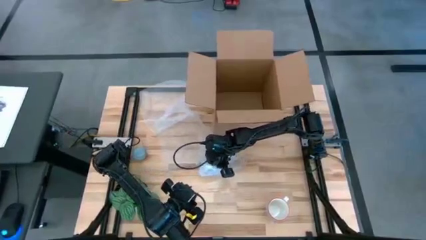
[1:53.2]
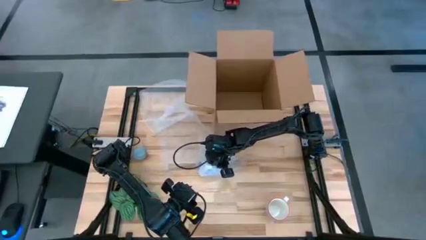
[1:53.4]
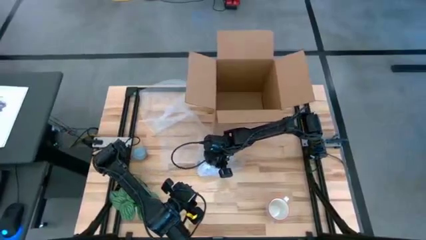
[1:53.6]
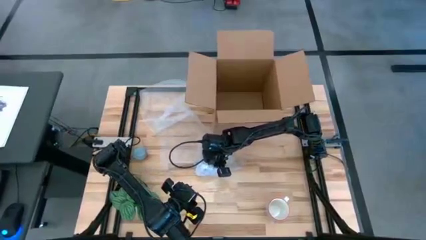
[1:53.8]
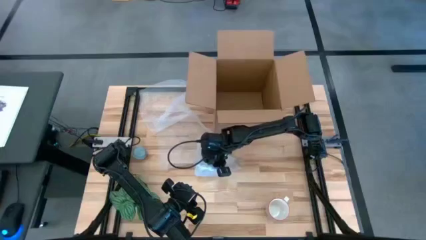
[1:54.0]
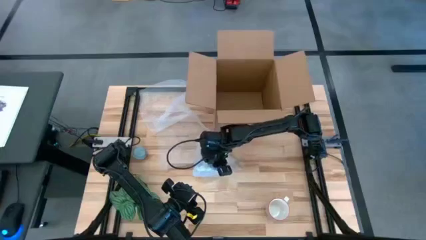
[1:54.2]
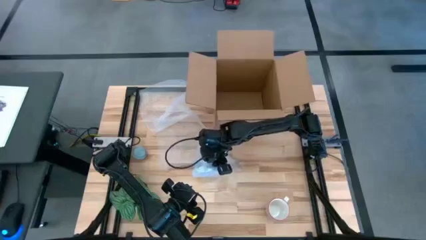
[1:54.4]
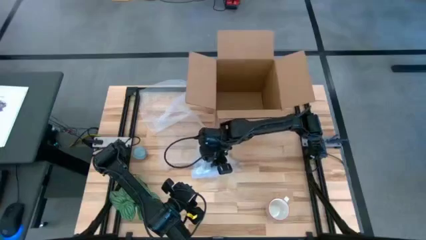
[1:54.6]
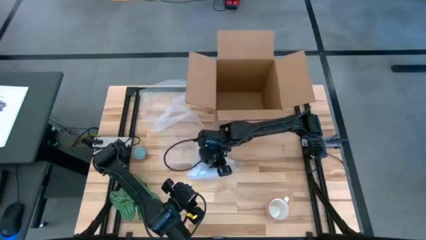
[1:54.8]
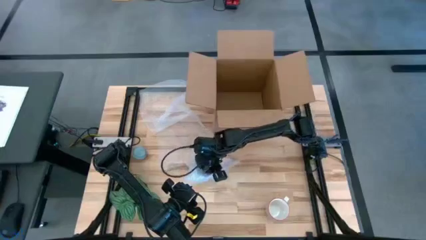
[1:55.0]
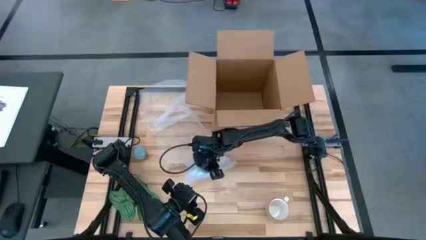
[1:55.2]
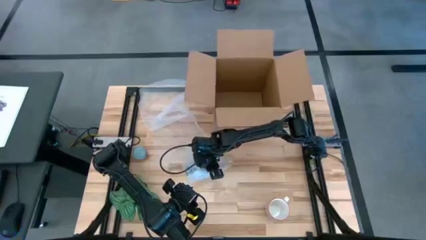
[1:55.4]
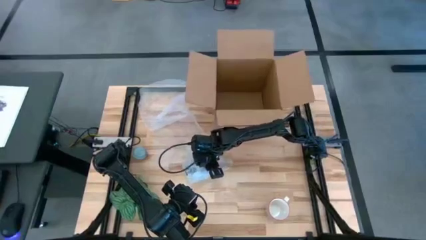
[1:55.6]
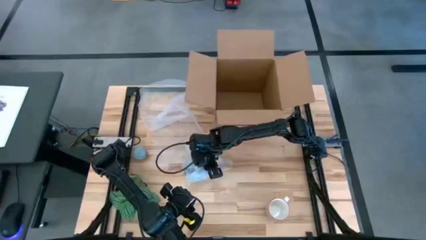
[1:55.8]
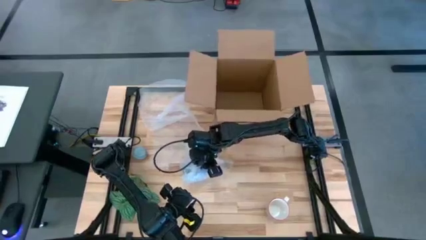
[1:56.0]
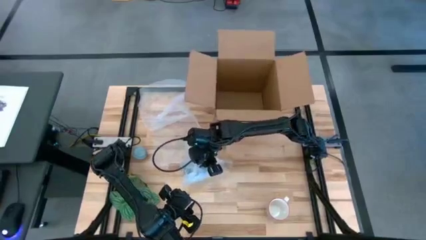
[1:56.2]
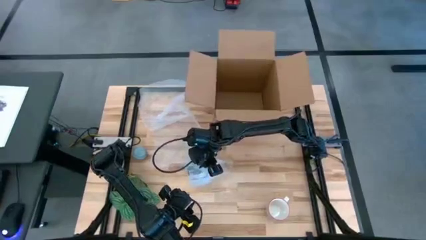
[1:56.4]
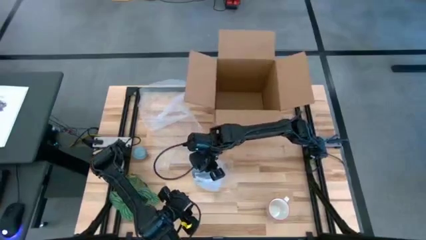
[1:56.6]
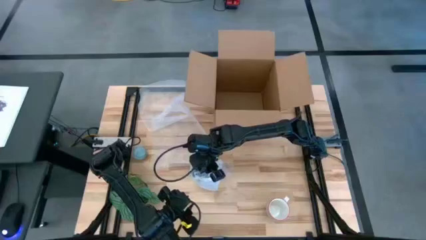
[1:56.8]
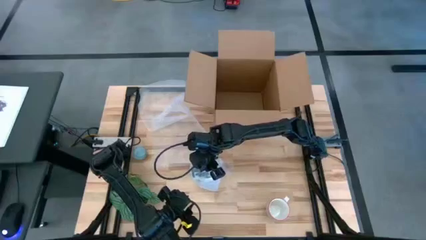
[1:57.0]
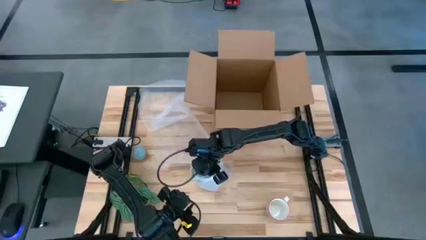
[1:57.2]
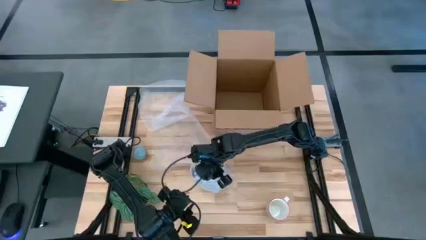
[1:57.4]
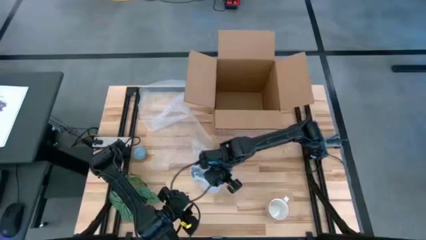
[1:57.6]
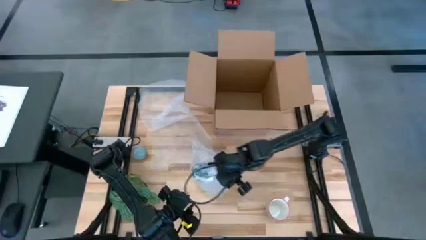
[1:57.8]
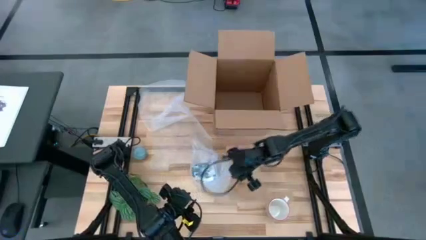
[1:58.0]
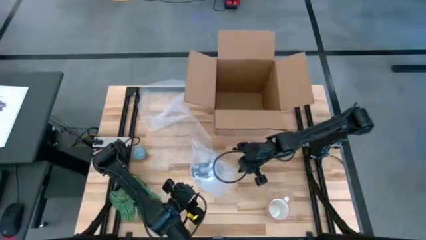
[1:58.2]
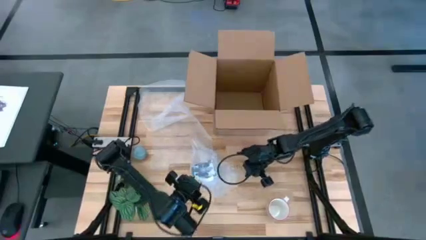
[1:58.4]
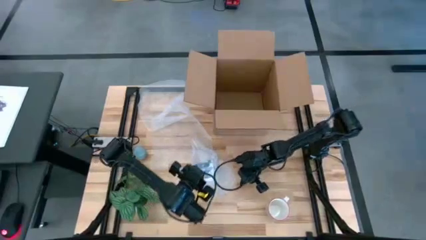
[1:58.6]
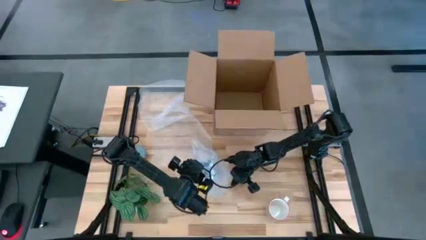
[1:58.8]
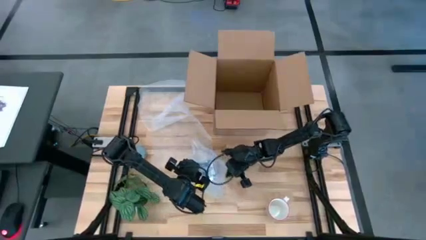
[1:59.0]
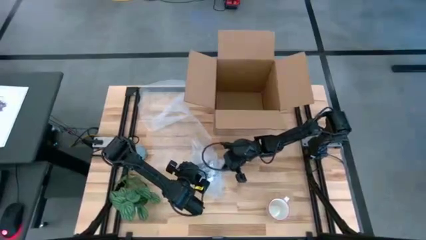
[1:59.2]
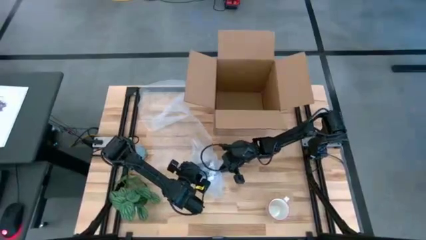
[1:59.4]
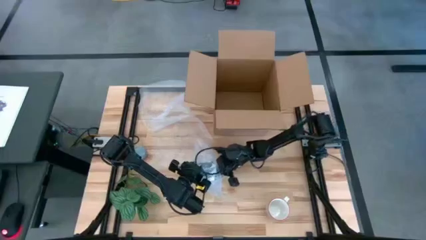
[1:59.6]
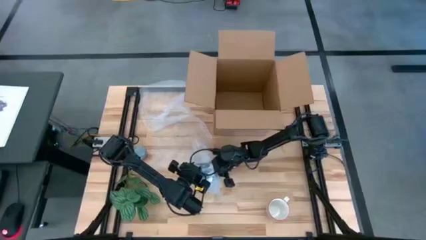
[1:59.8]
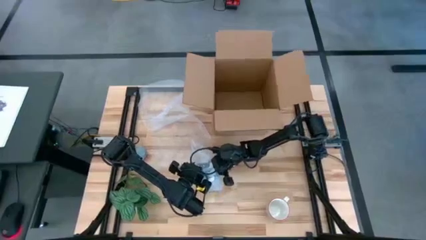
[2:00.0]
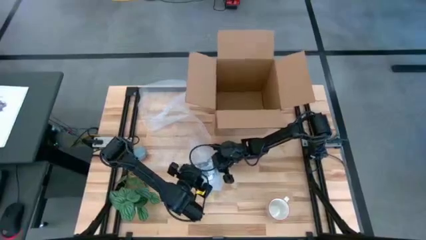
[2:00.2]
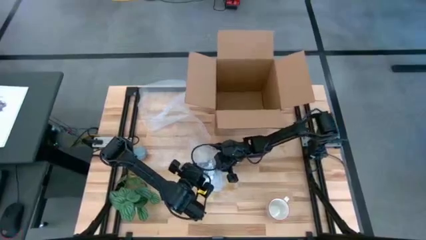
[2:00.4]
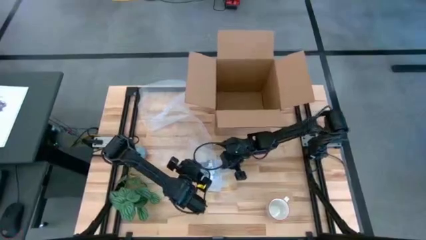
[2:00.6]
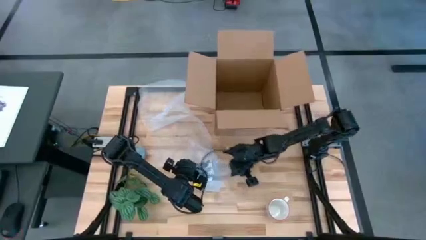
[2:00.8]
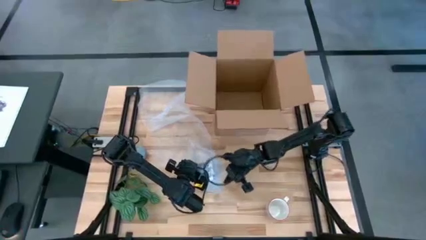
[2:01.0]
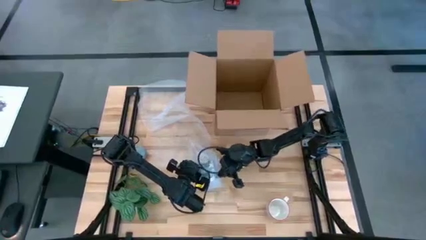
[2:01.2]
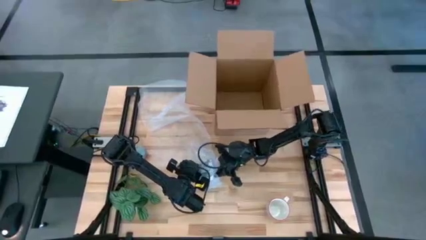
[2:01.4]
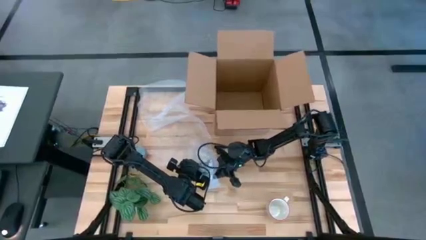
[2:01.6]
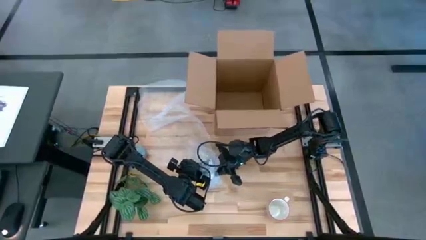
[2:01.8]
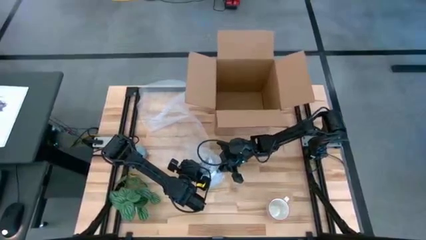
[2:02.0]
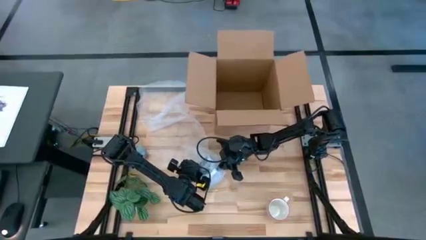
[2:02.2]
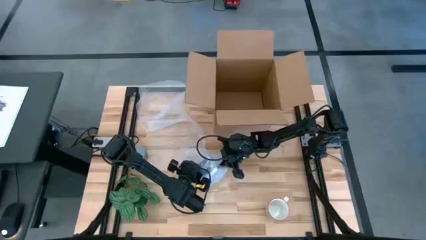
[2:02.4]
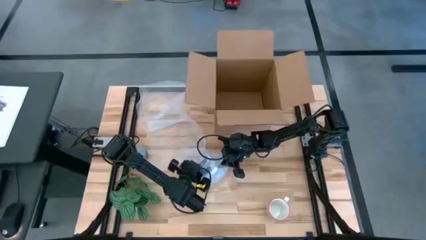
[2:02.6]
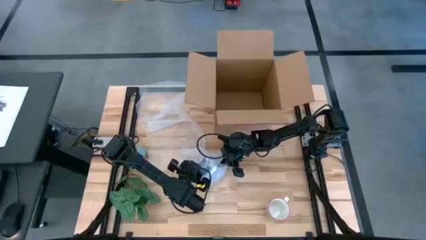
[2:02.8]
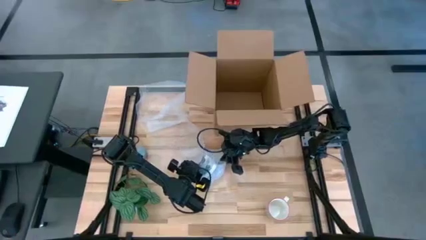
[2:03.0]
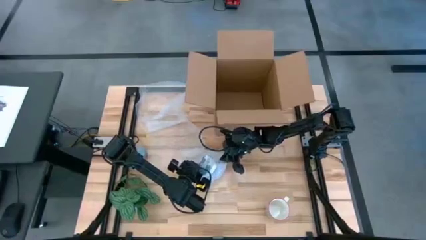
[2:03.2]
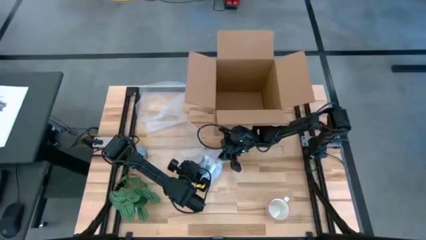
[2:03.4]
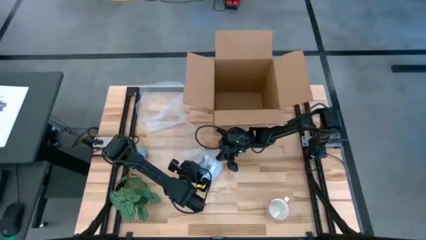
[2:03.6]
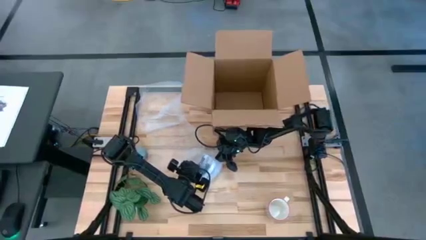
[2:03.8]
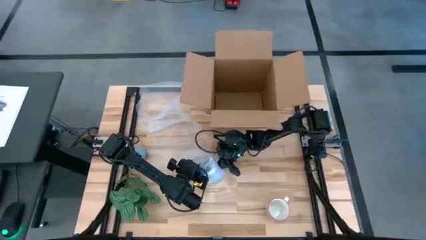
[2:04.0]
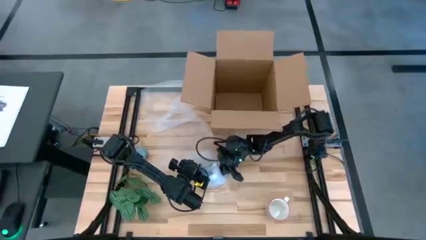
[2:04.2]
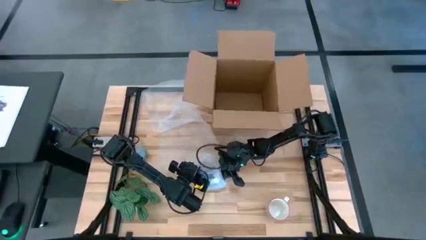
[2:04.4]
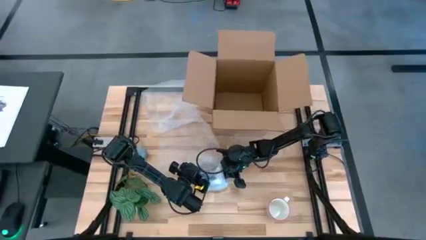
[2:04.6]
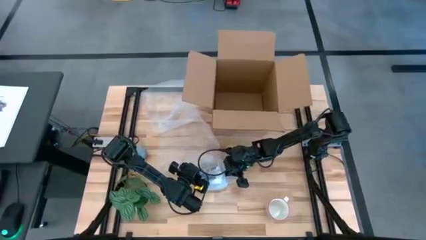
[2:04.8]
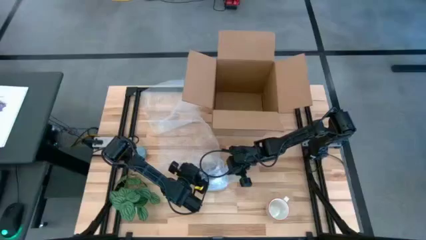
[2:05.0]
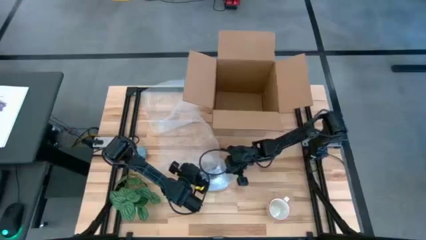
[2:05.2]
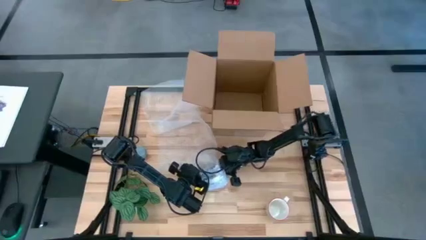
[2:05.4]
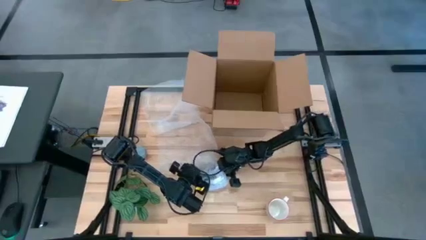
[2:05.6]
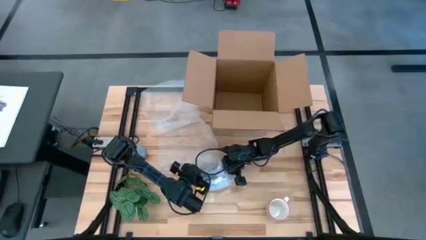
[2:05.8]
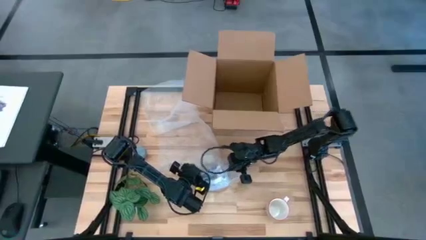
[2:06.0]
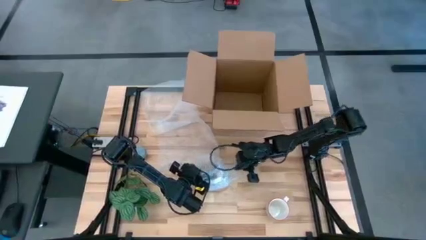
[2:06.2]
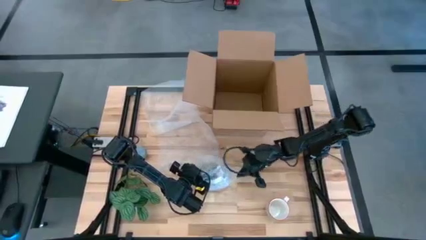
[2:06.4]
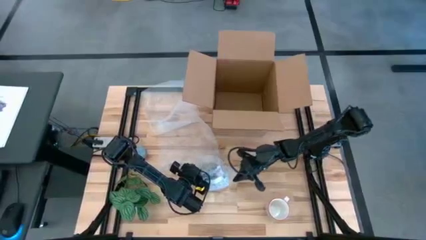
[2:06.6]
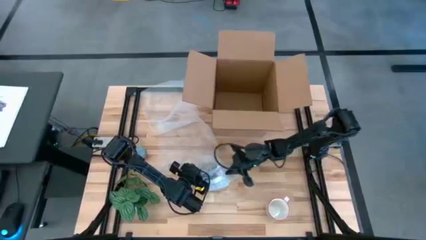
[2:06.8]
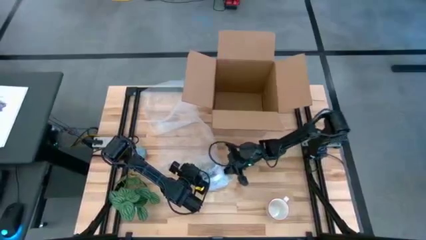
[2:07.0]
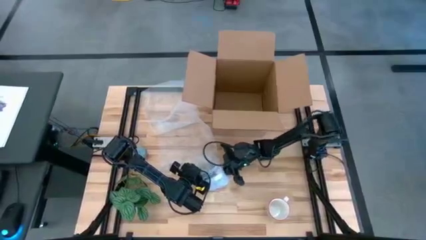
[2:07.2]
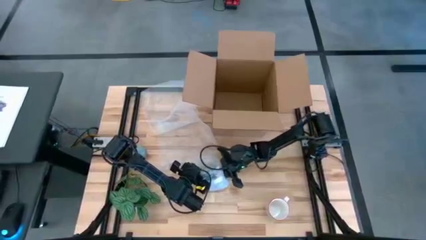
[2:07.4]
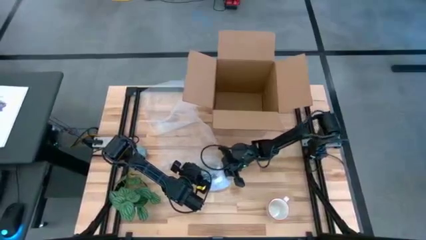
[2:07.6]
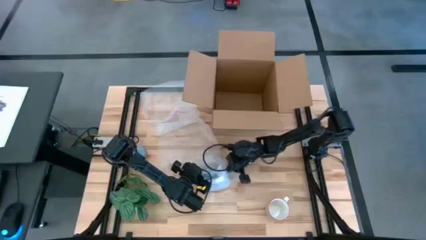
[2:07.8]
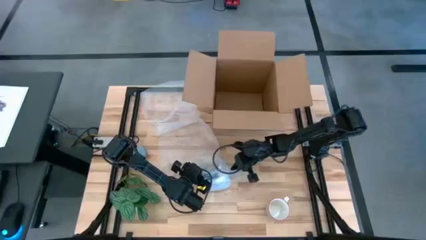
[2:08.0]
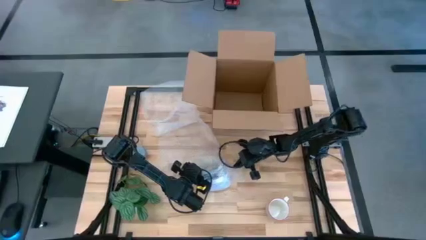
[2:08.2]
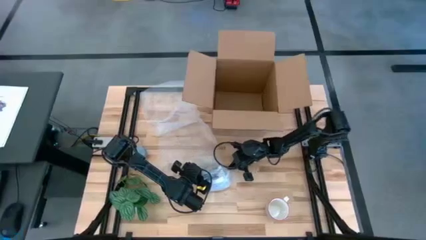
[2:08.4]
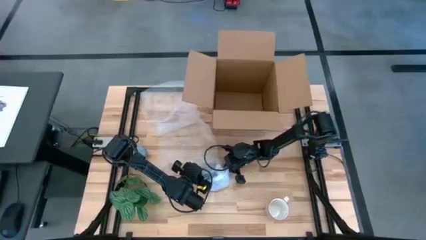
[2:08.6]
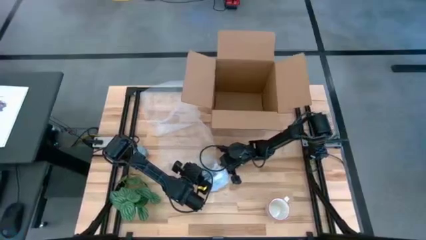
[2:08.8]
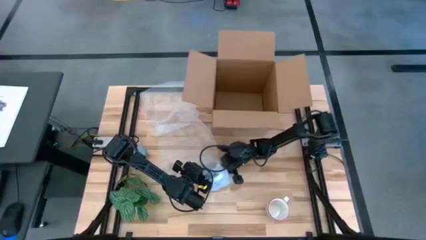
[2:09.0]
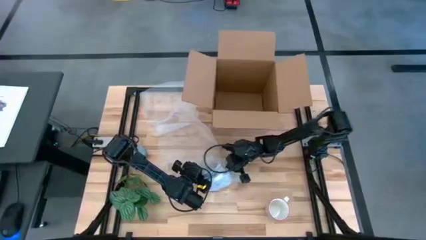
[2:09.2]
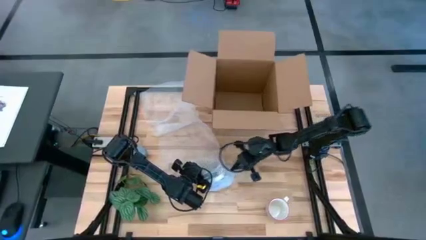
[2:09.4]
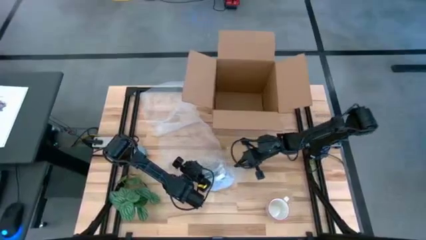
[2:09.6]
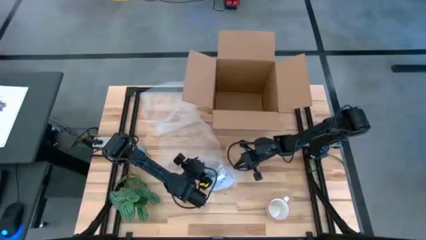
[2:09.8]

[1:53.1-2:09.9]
Task: wrap mug
Wrap the white blue mug with bubble wrap
